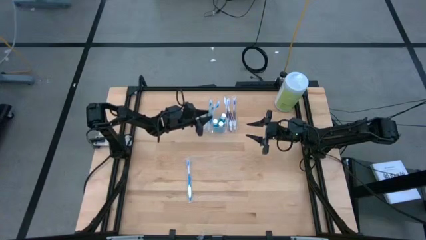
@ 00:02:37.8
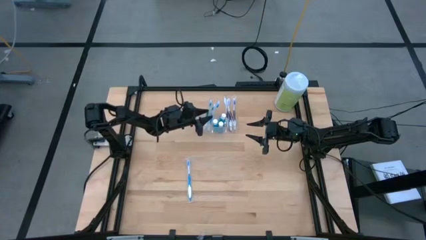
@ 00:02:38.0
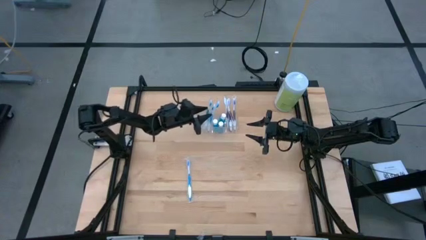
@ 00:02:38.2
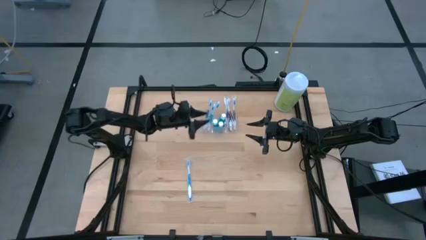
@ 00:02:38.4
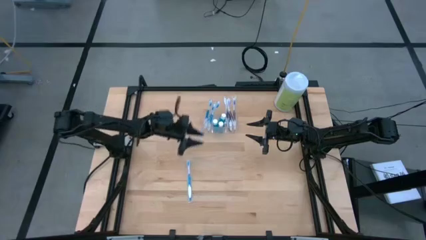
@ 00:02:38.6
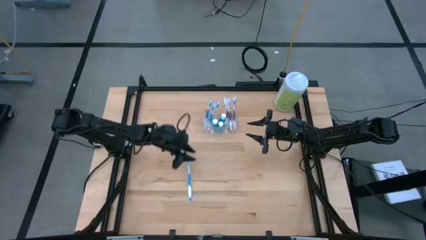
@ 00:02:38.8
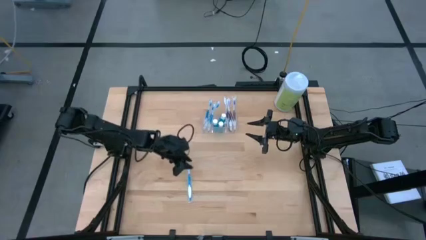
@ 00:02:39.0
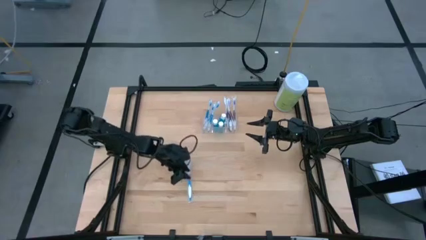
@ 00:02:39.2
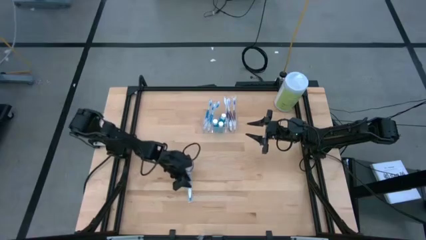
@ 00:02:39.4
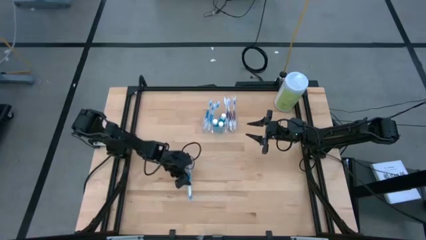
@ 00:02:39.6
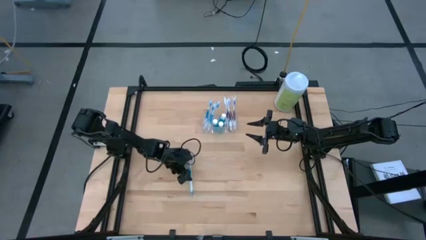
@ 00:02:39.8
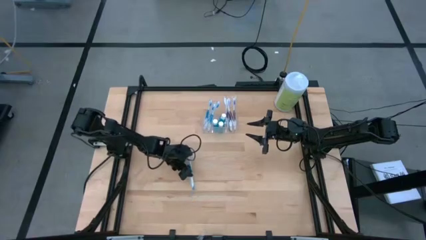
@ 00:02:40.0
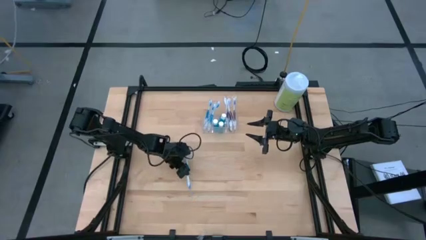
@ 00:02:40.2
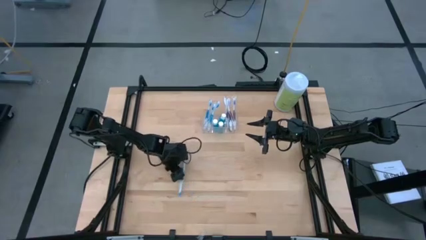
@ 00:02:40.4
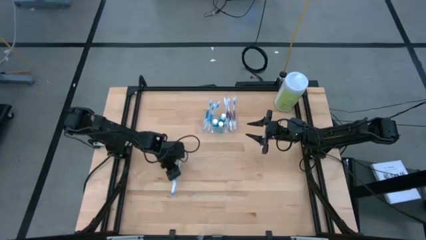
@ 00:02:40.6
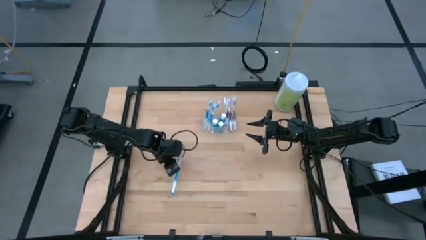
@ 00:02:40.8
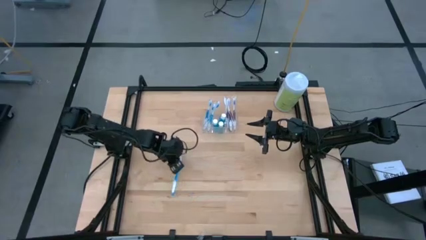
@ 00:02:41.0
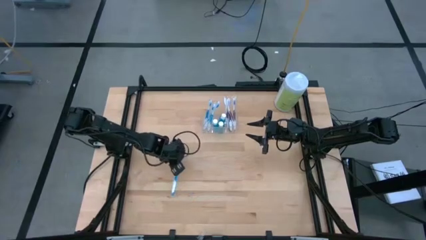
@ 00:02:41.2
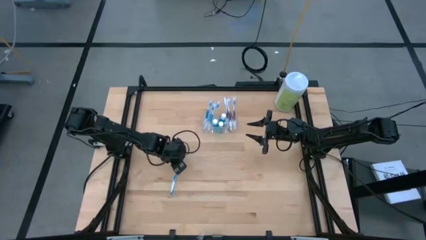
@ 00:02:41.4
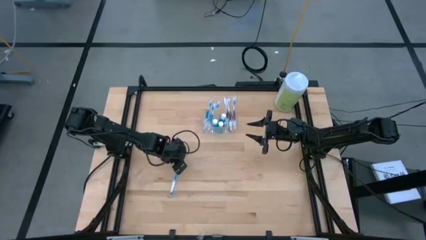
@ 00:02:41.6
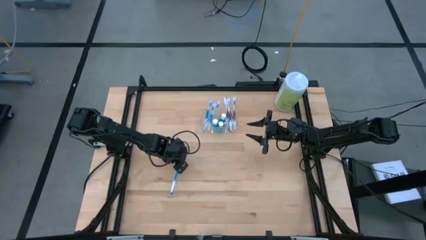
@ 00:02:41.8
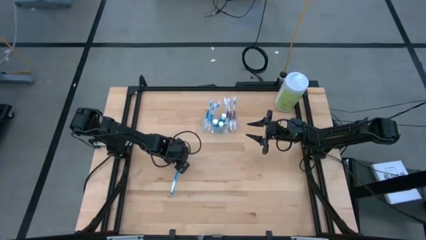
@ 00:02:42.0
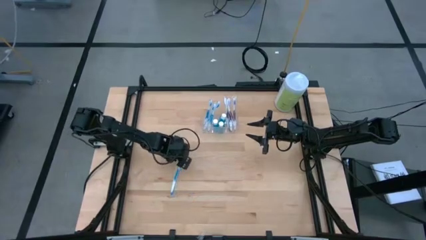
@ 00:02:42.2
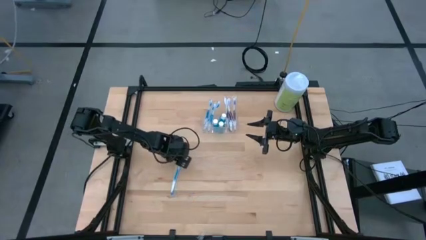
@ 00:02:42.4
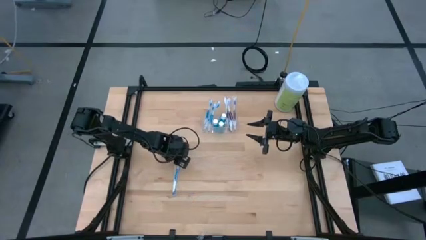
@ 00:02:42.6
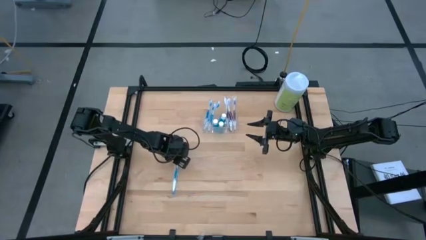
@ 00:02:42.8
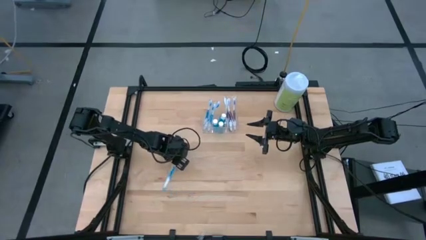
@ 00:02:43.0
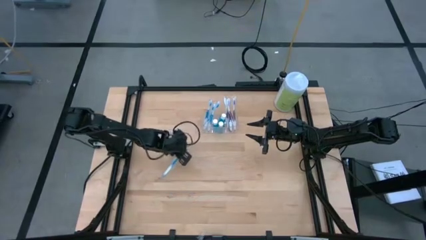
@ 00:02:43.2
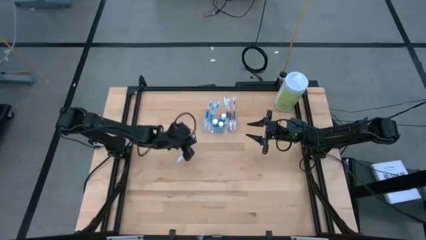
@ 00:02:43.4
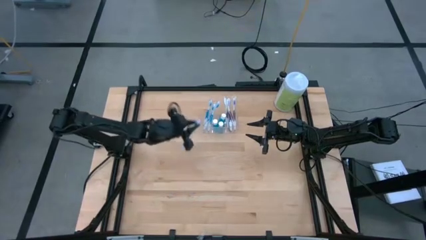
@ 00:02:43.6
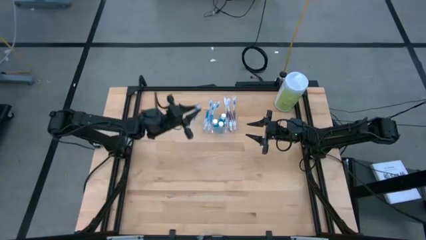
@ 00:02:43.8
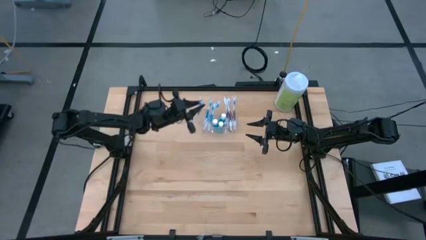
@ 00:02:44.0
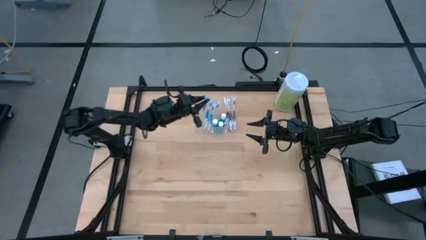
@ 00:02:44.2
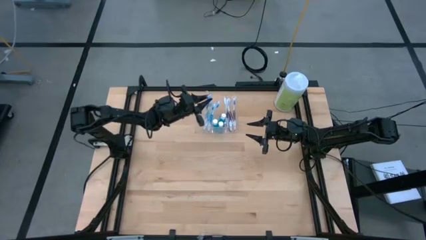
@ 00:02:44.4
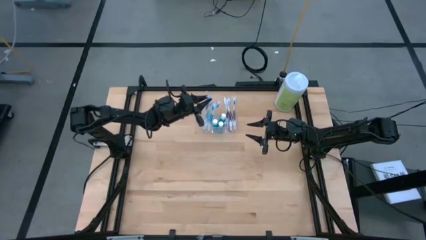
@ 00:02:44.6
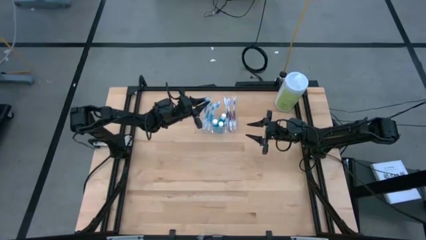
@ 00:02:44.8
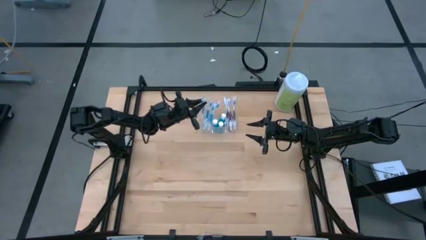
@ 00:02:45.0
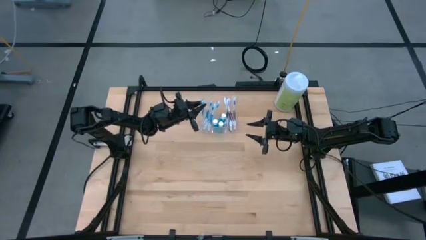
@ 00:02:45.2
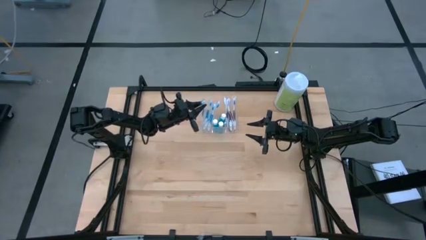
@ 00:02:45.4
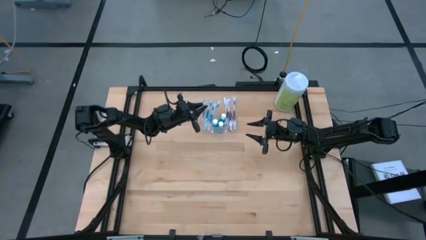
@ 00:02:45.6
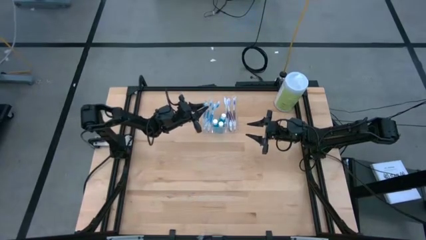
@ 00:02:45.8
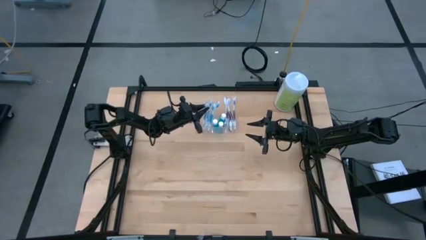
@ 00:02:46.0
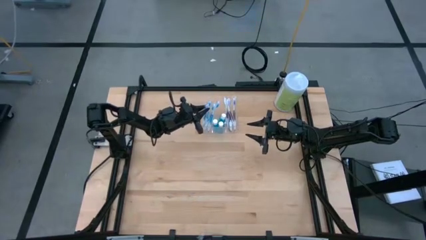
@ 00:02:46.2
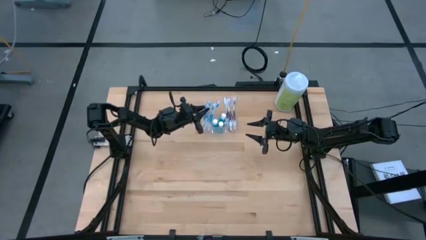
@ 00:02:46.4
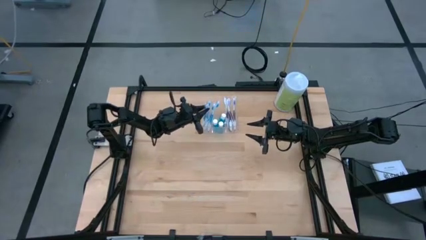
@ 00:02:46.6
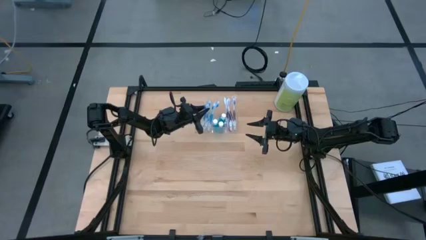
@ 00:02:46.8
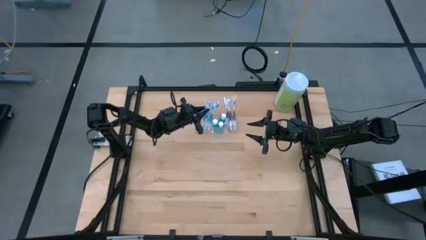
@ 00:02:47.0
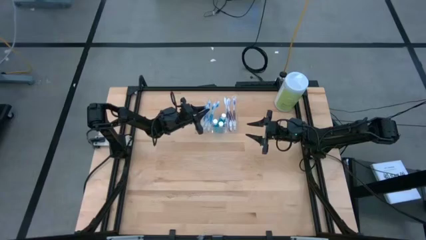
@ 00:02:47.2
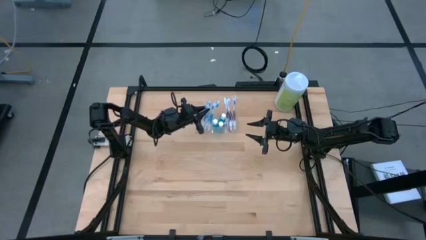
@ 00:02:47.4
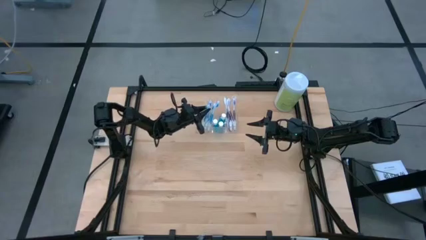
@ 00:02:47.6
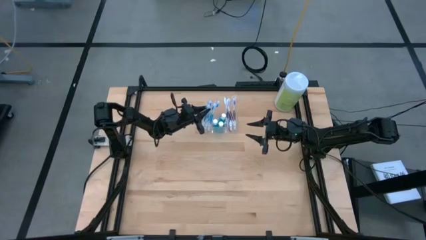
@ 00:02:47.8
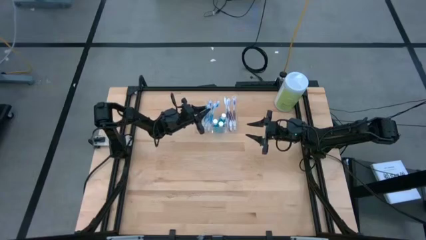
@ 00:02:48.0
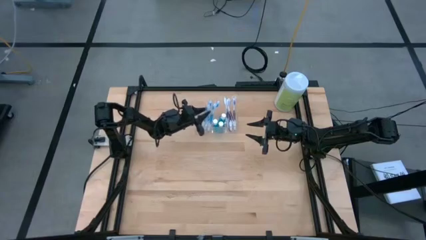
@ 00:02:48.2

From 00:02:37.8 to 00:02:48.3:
Task: Pick & Place toothbrushing station
Put the blue toothbrush into the transparent organizer

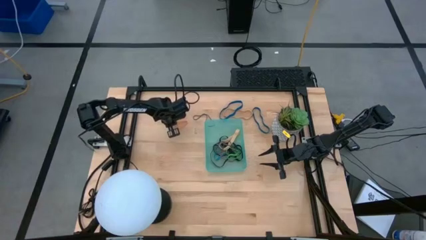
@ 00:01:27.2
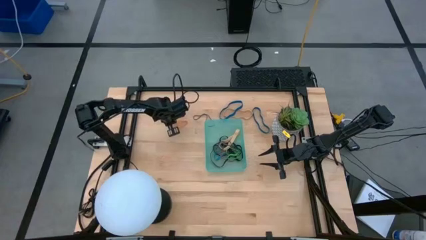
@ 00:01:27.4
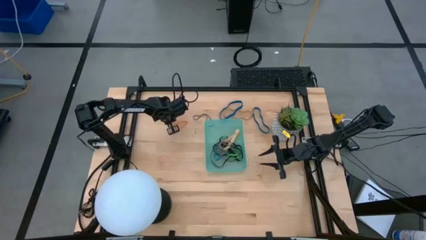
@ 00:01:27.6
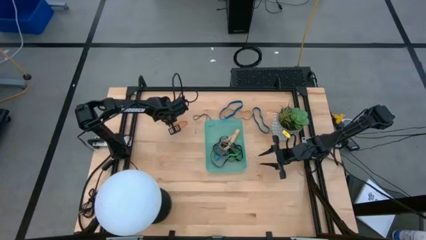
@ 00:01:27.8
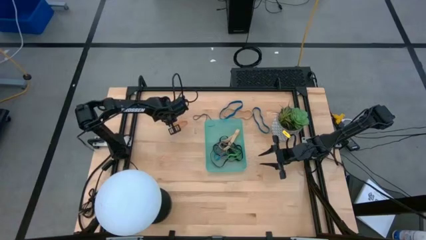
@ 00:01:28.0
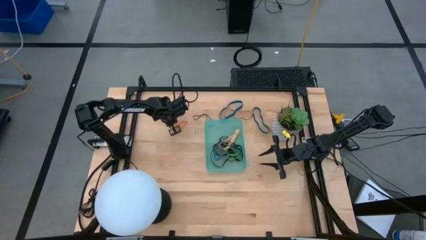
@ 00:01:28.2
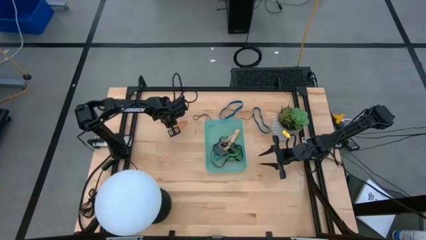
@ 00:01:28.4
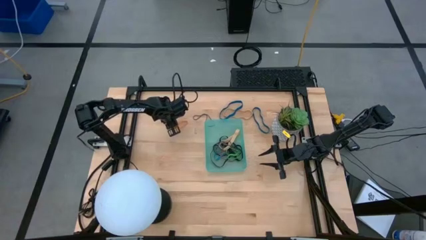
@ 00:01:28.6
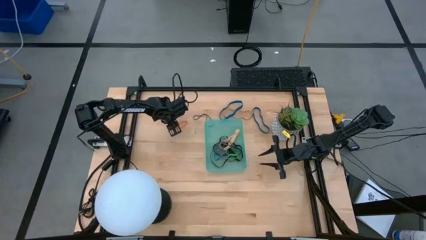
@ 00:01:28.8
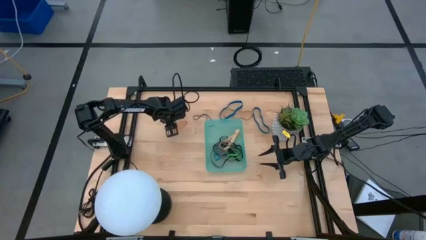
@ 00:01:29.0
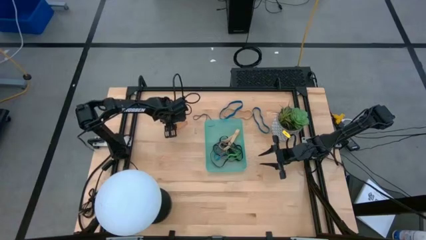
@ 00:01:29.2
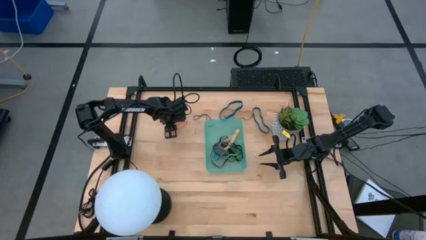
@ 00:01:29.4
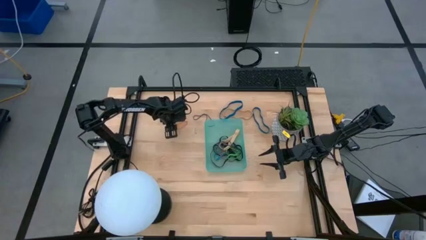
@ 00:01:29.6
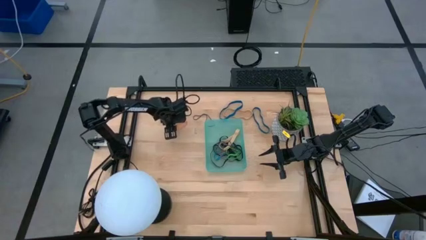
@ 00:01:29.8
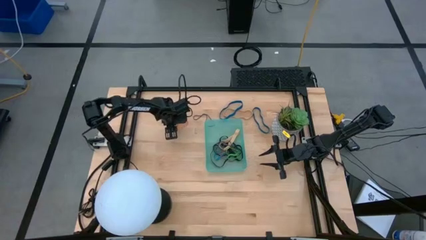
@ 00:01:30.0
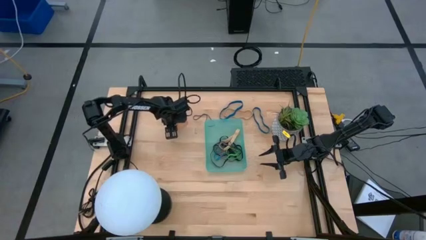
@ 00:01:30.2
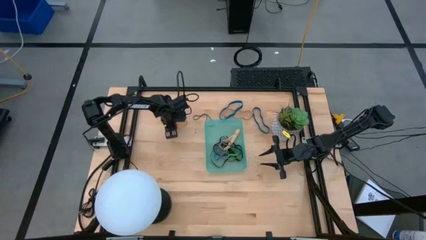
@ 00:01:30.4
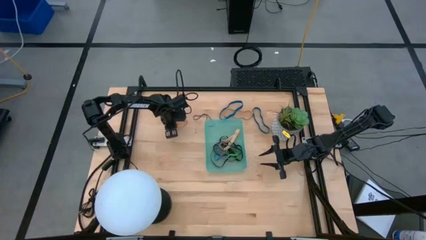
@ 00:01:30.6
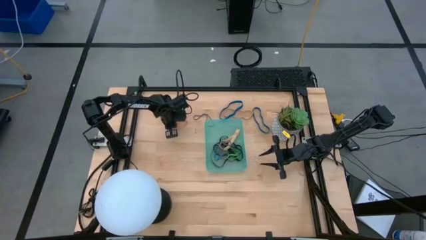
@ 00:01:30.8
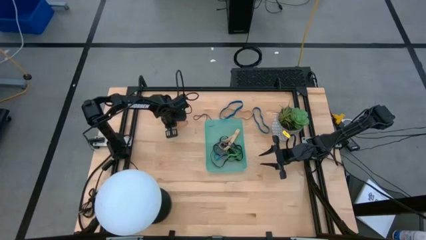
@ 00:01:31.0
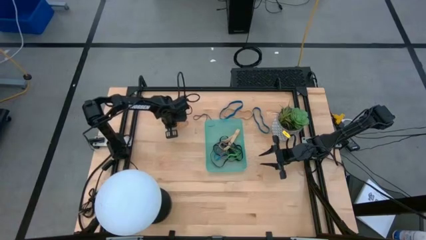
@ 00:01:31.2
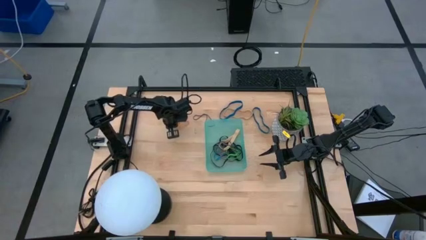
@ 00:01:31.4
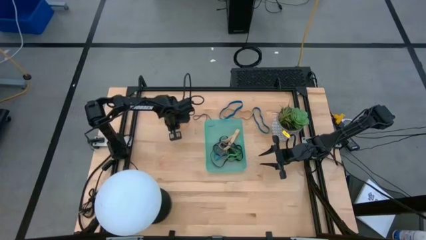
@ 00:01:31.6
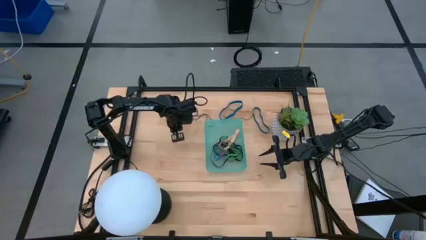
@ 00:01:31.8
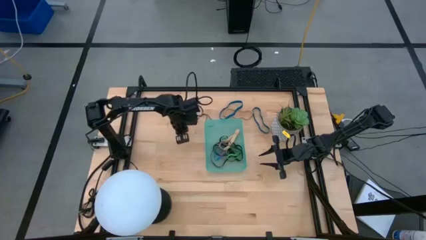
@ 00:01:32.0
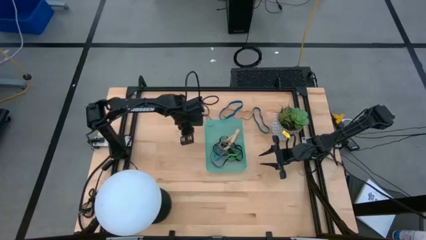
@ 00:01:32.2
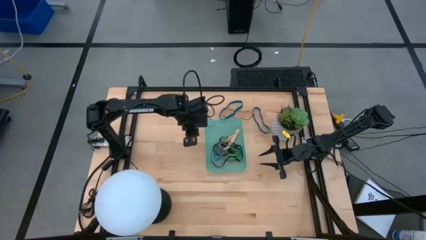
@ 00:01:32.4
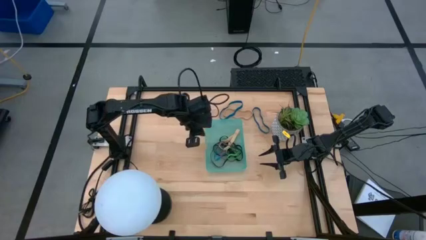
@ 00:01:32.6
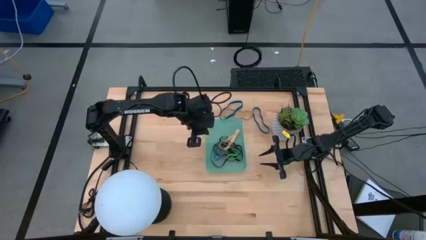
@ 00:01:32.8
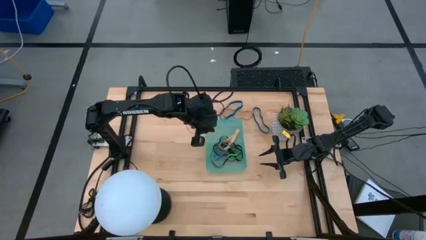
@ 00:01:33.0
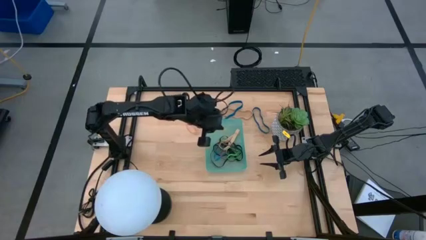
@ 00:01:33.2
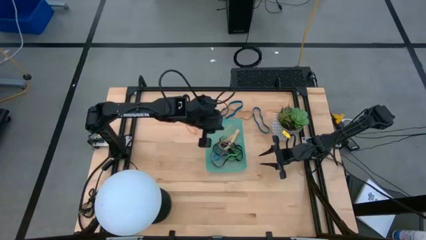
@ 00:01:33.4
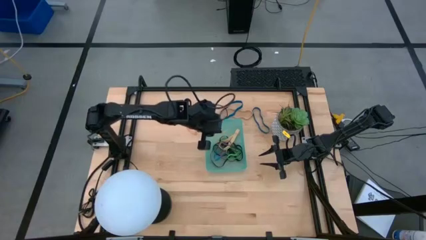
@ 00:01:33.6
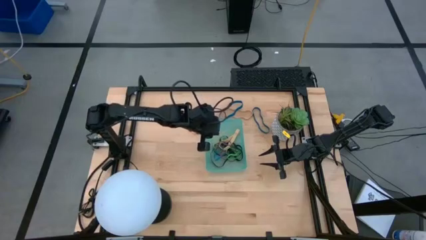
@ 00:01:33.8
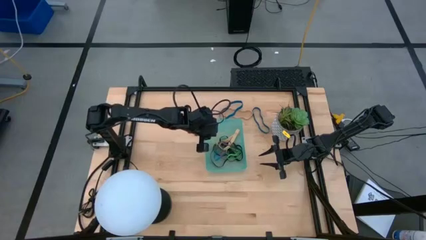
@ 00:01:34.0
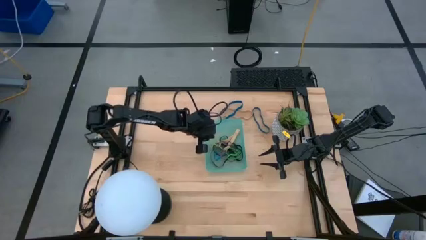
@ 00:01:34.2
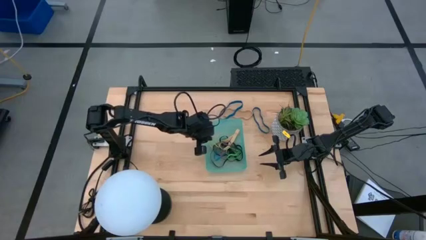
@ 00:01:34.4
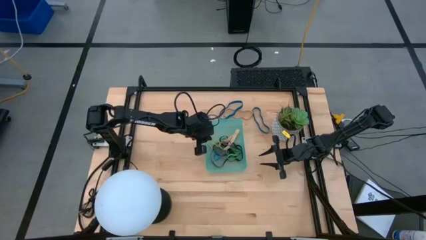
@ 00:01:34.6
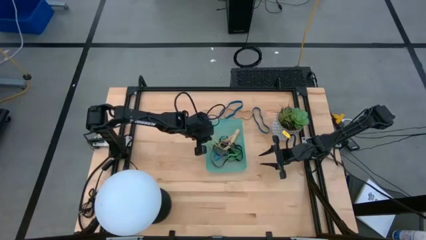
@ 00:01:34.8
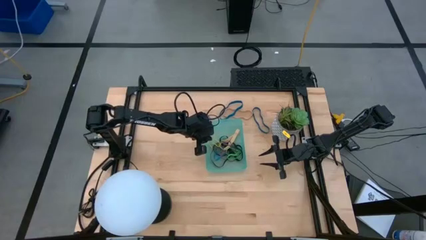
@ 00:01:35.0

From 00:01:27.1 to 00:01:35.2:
Task: Pick and place rubber bands into bin
Put the yellow rubber band into the green bin
